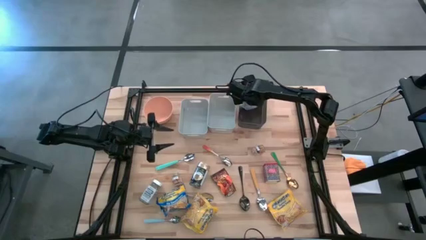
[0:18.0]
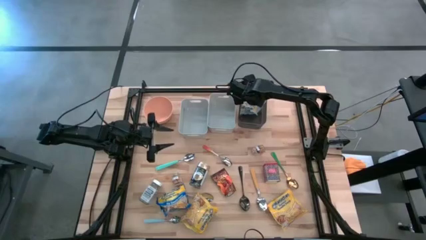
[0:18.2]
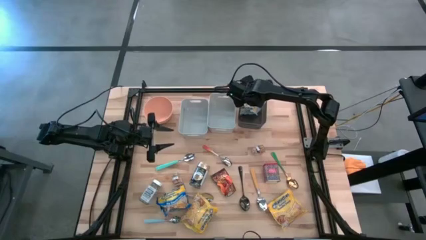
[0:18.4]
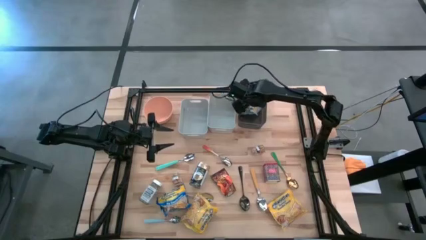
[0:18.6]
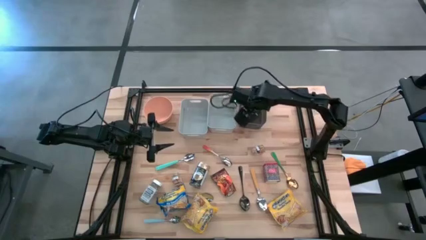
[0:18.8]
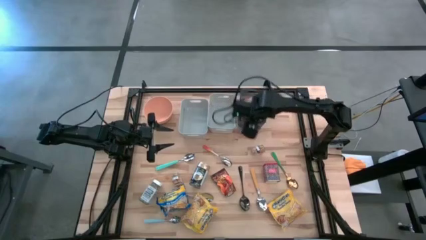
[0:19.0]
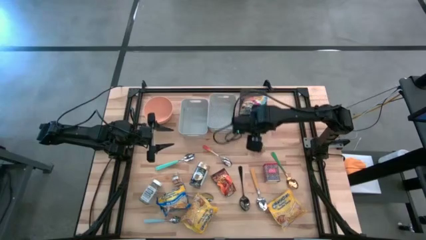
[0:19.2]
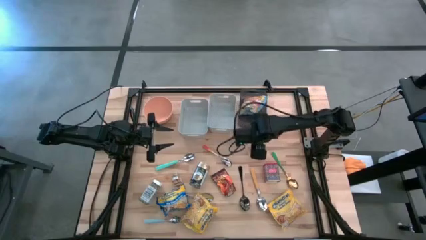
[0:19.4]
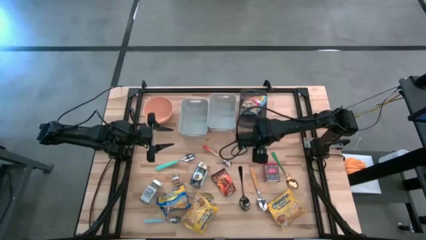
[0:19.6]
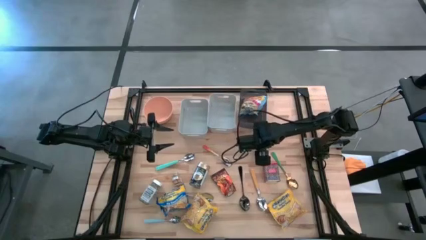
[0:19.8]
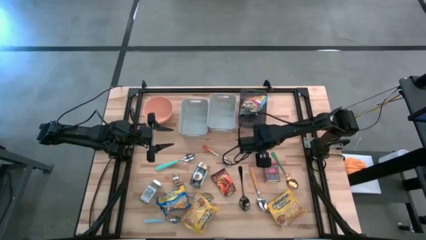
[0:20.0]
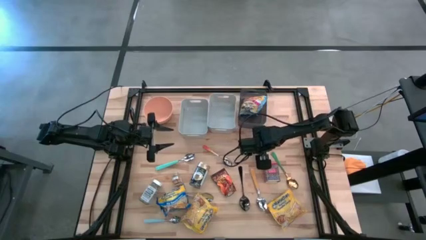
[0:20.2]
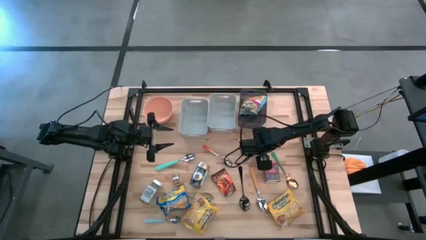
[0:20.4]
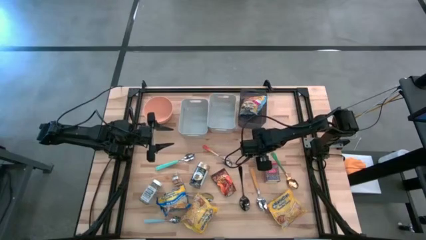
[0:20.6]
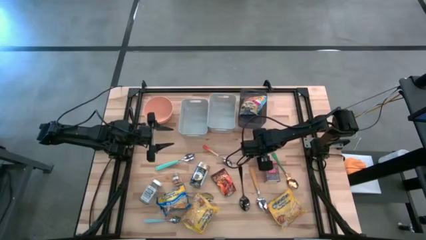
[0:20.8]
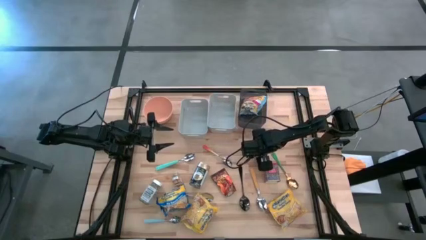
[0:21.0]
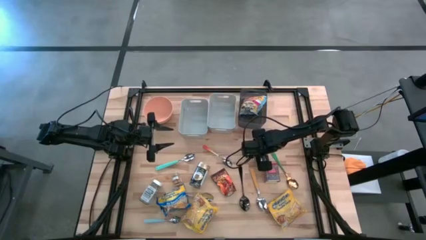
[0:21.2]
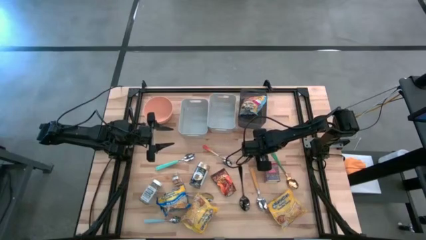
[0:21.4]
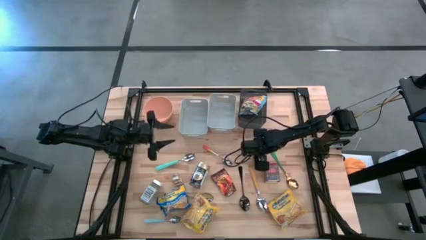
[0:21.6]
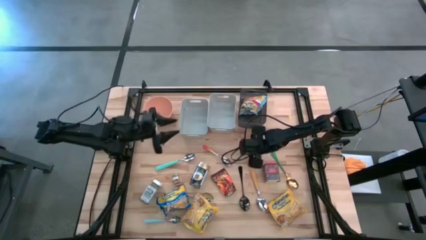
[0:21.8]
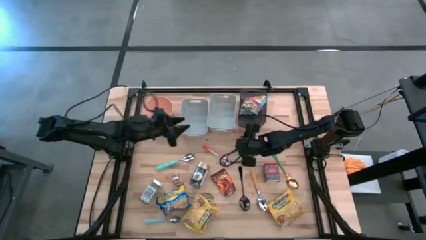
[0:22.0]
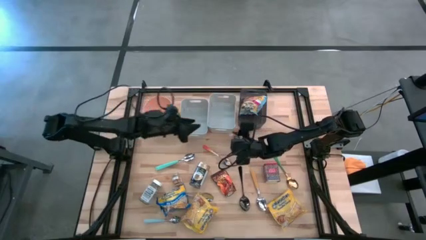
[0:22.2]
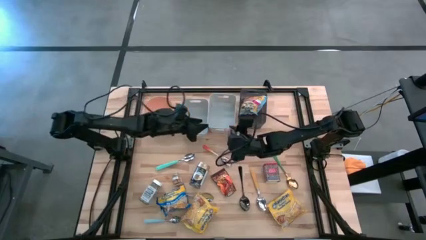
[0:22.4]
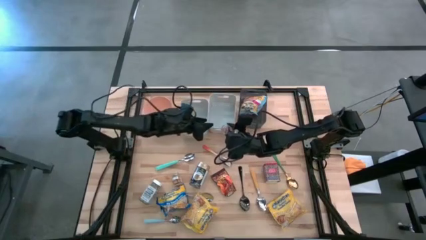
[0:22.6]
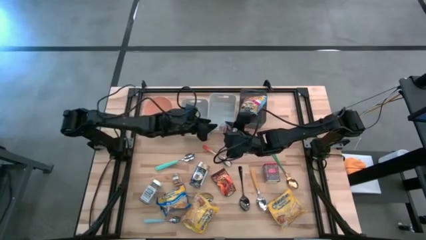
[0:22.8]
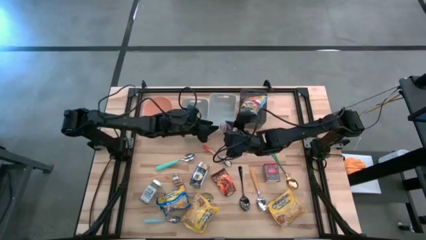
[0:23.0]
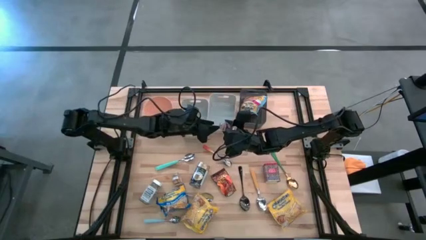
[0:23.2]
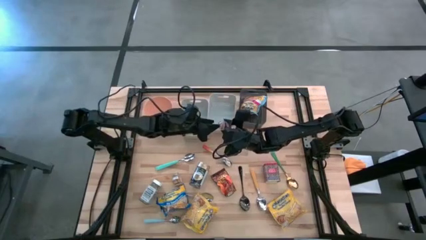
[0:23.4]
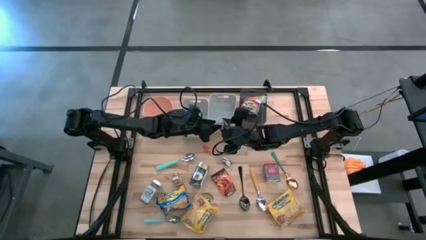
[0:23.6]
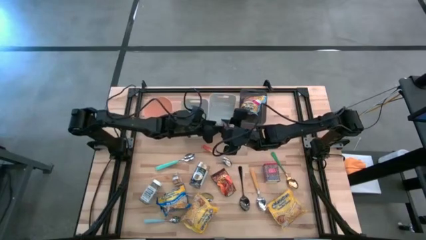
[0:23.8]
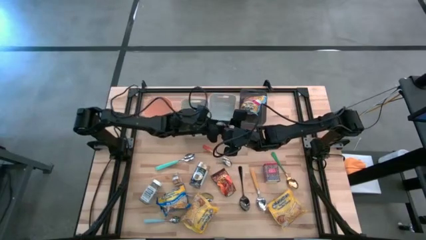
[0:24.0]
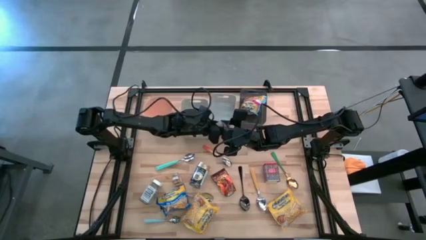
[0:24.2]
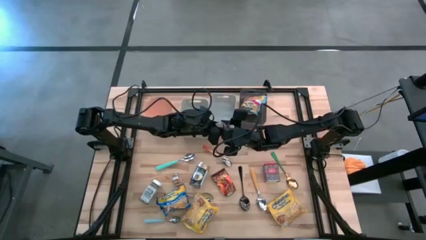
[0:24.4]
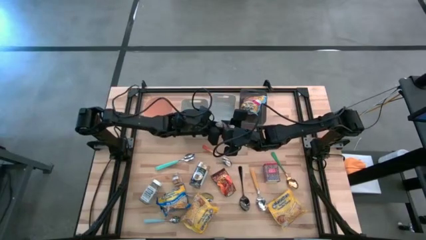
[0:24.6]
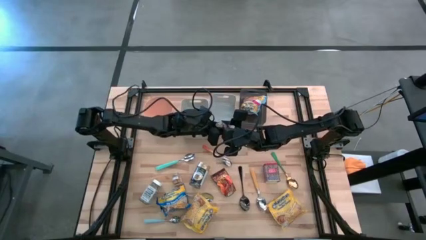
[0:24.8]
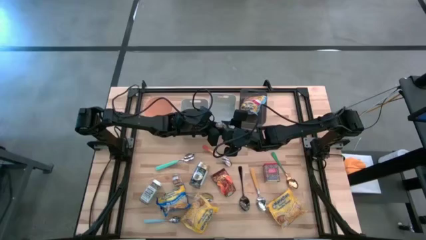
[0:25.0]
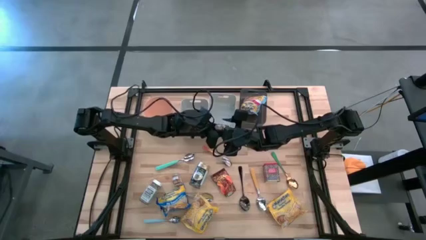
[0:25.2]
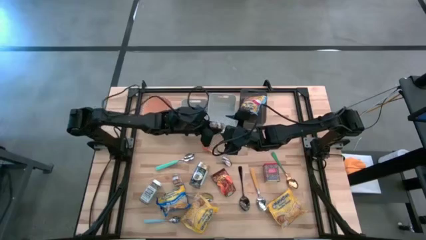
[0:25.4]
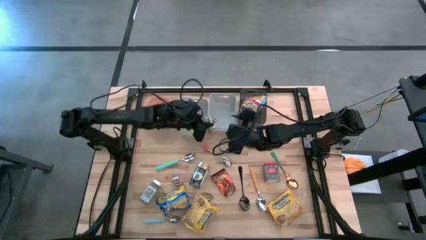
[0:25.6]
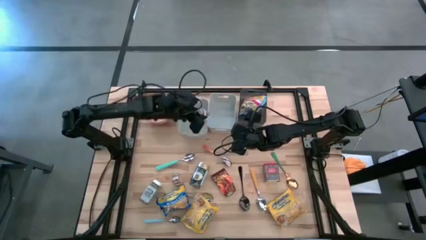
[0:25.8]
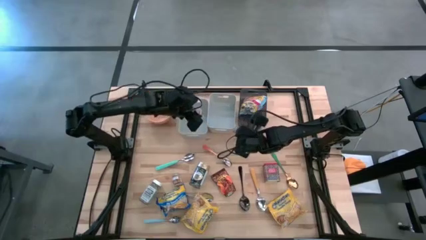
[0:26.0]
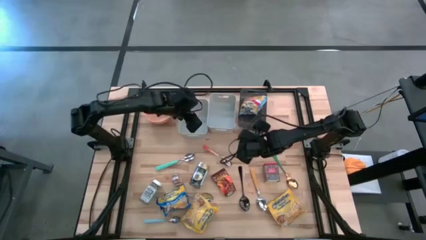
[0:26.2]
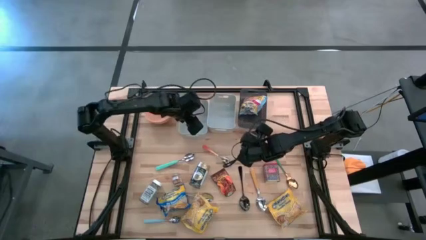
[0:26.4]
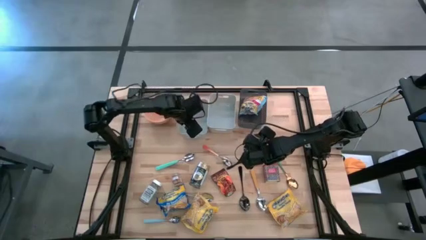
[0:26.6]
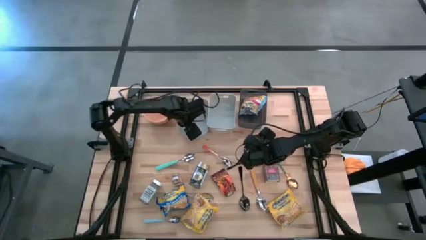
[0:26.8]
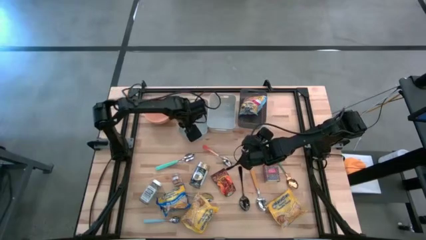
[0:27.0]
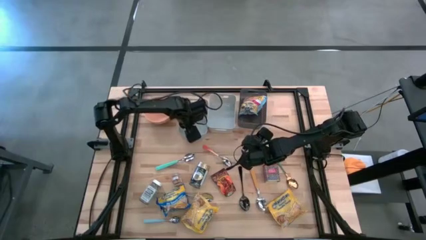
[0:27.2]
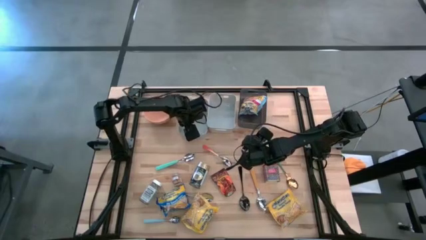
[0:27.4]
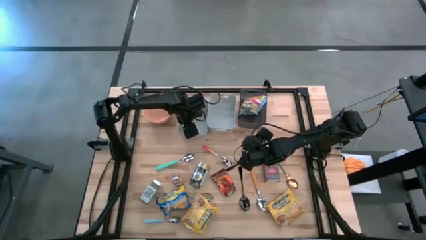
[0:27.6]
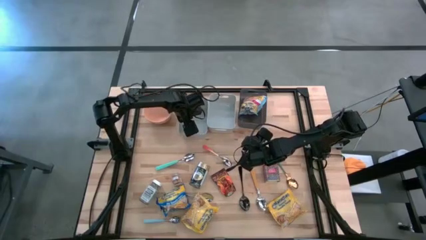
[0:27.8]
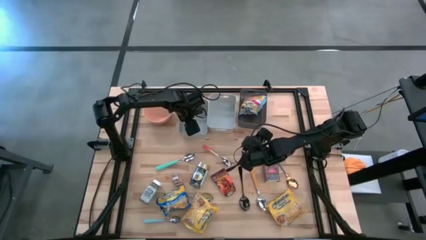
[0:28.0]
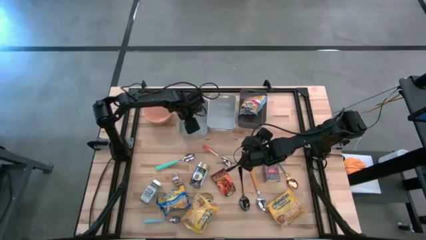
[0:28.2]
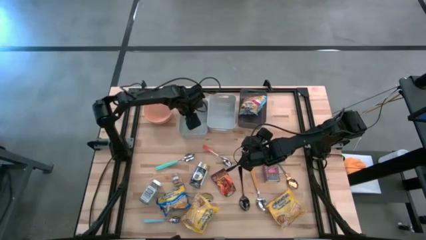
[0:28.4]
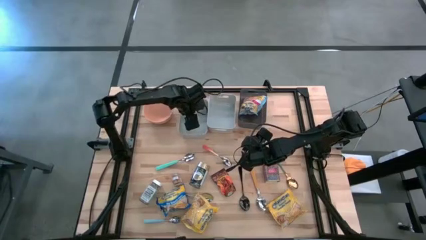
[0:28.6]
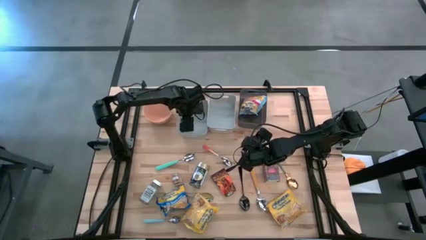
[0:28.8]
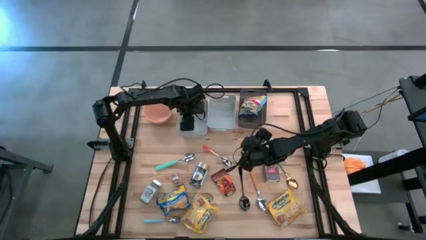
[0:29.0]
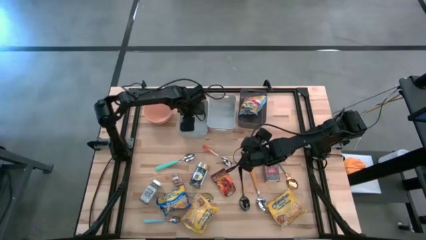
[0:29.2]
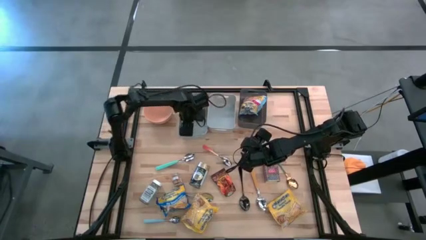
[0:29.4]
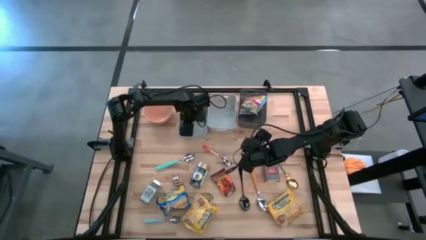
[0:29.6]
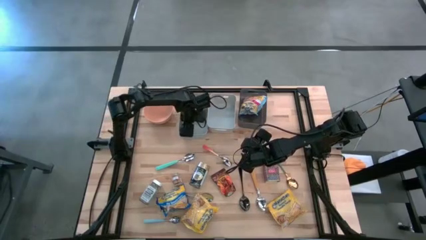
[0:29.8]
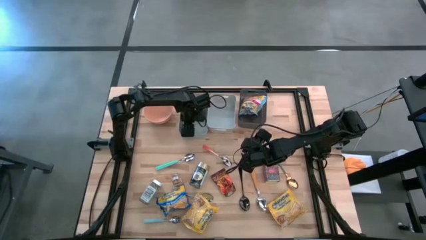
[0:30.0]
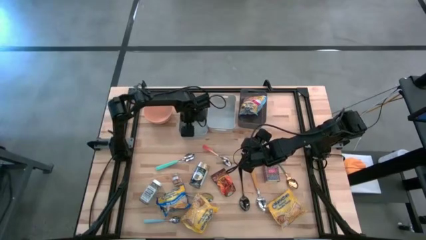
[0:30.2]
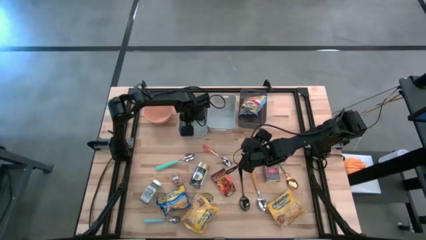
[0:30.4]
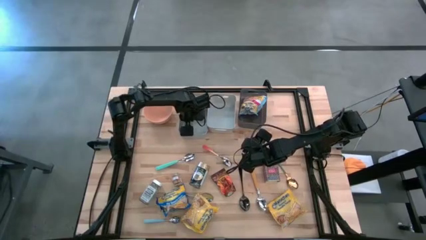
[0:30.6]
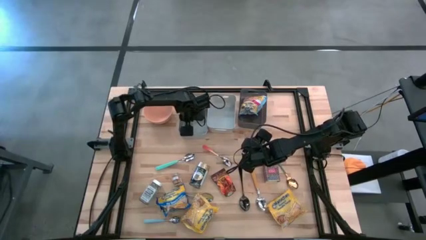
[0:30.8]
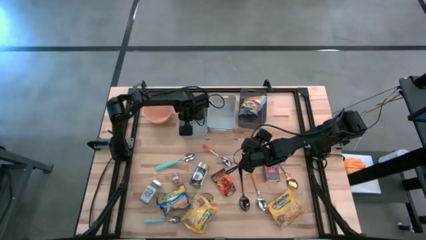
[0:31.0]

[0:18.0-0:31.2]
Put the right brown seasoning bottle into the left gray bin
